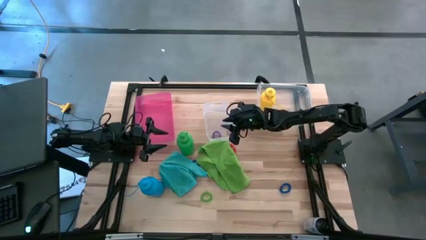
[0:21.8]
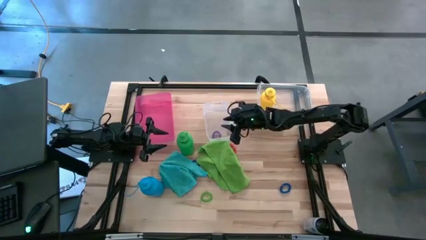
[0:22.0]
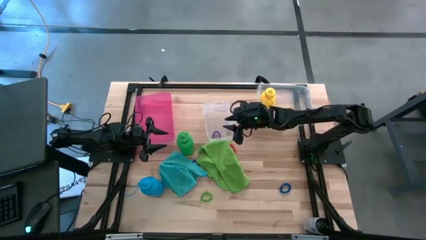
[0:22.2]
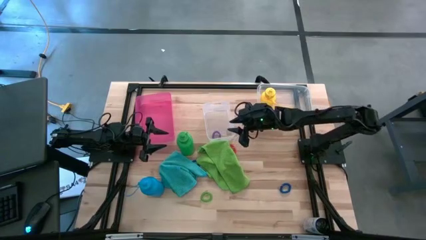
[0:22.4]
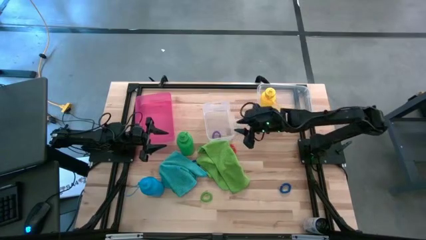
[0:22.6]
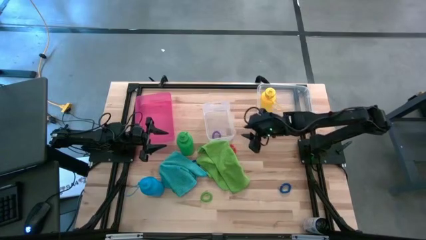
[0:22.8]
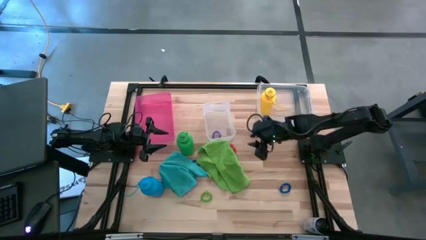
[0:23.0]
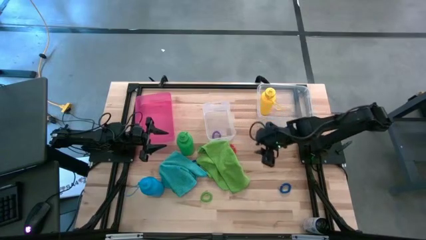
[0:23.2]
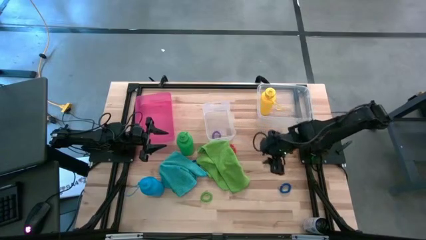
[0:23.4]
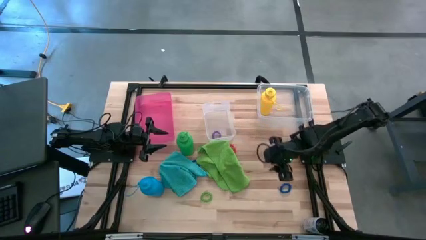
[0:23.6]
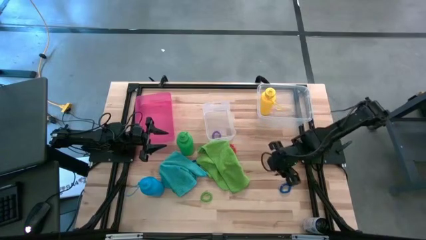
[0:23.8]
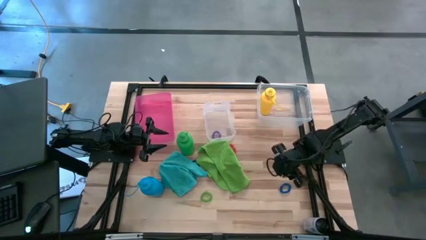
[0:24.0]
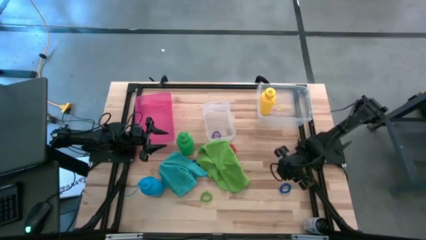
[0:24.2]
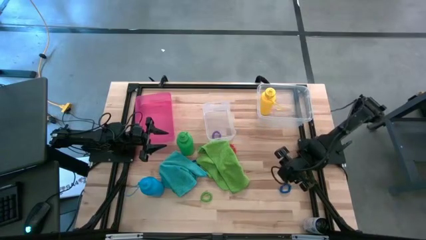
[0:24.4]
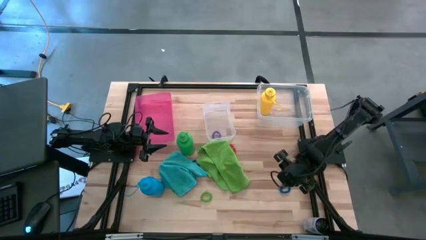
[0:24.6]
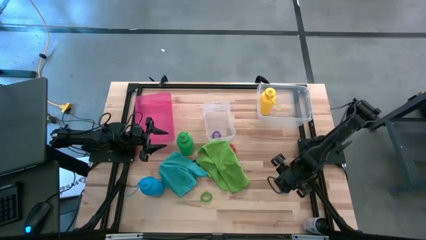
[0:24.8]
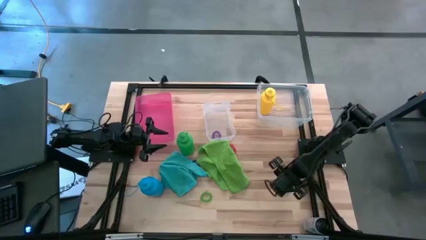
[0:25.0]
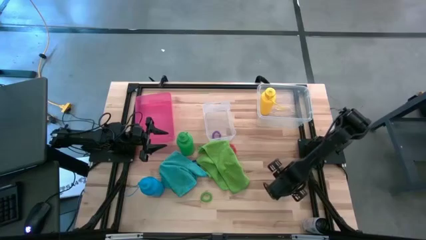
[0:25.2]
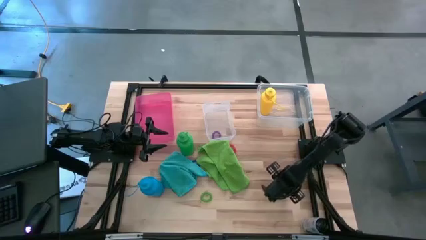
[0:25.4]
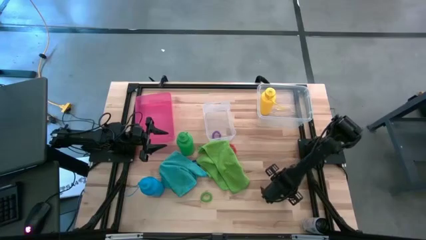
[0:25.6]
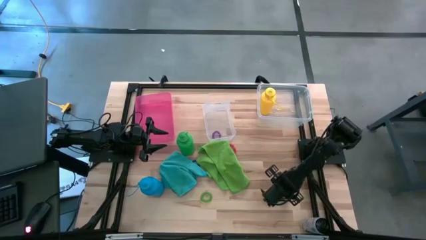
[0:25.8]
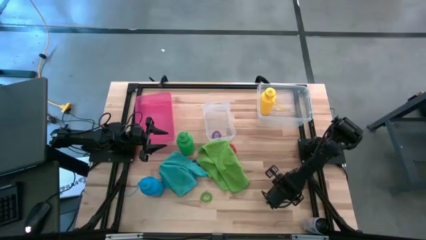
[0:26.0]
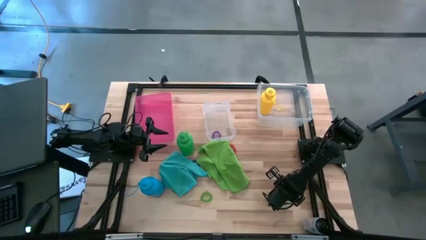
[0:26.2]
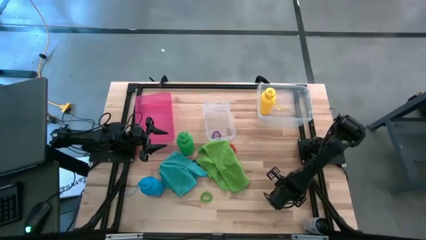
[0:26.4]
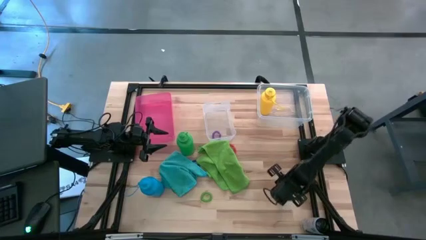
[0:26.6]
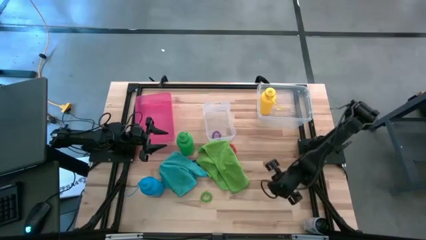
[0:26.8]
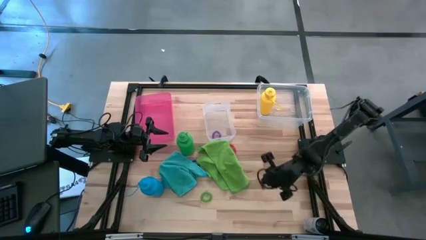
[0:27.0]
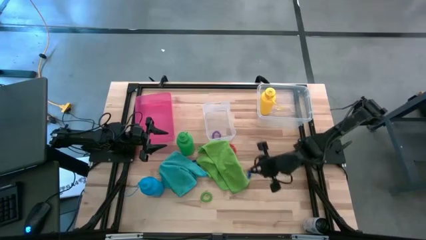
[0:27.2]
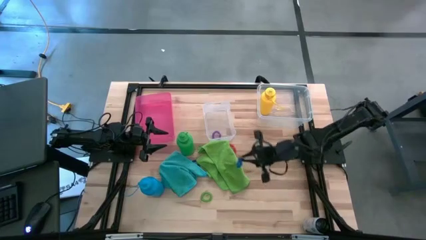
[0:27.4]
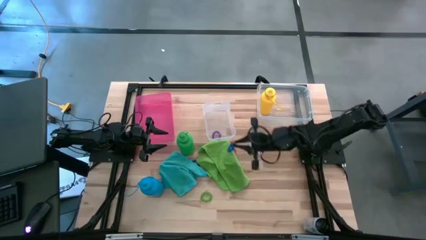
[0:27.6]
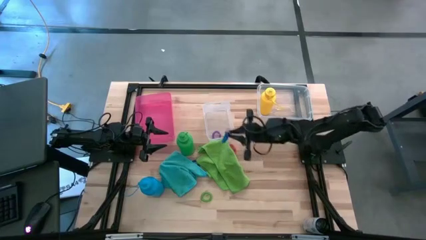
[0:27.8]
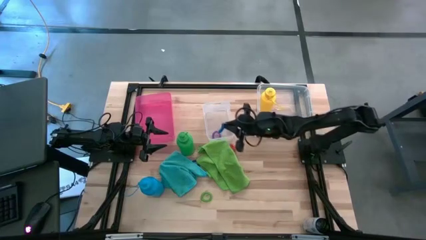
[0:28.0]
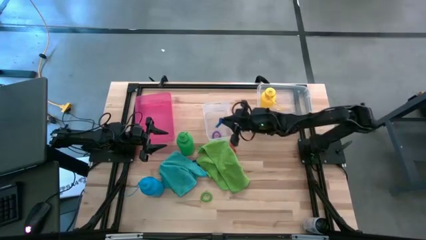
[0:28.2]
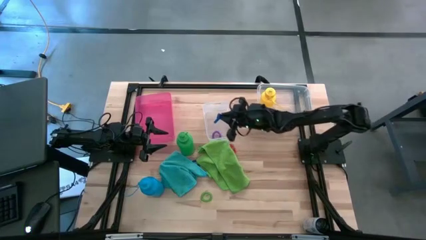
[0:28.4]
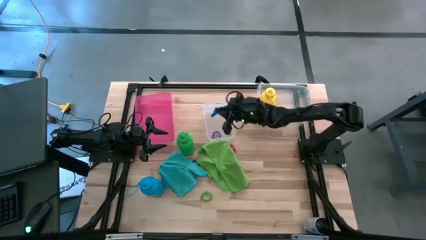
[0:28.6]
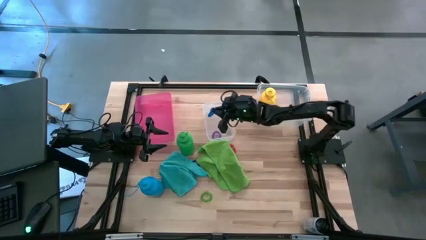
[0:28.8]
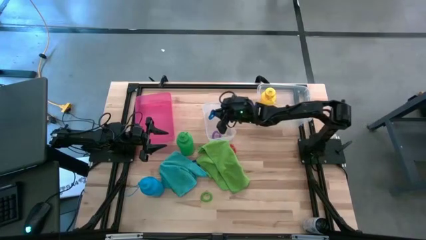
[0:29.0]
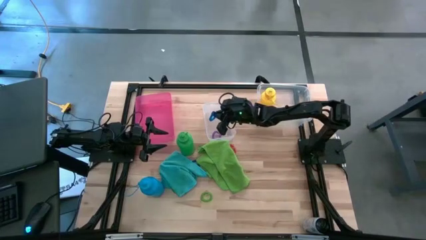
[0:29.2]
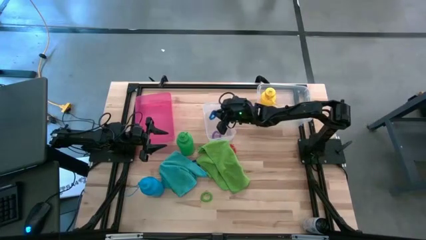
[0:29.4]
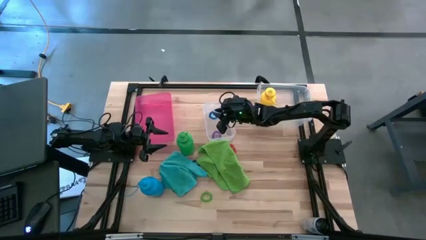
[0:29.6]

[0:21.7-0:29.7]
Task: Pick & Place Sports Items
Put the right blue spring keychain into the left transparent bin

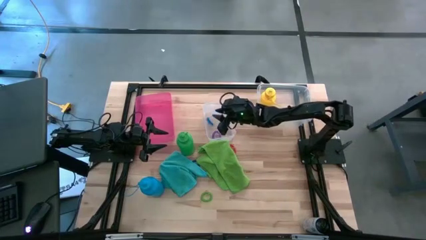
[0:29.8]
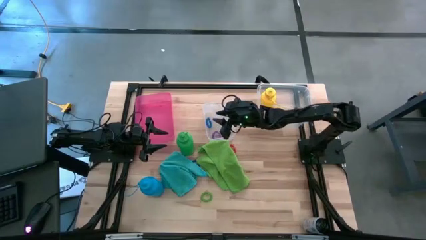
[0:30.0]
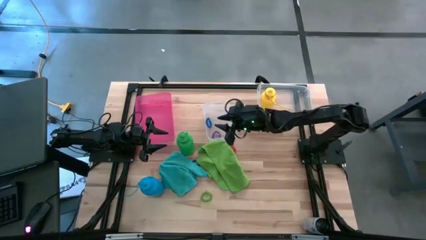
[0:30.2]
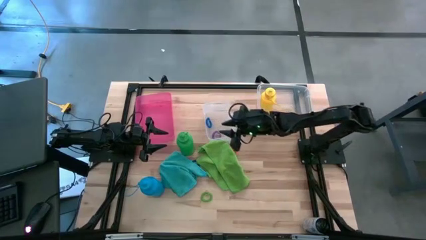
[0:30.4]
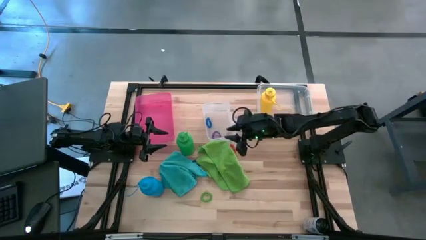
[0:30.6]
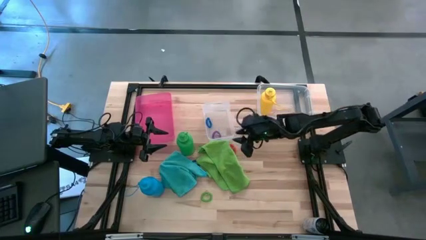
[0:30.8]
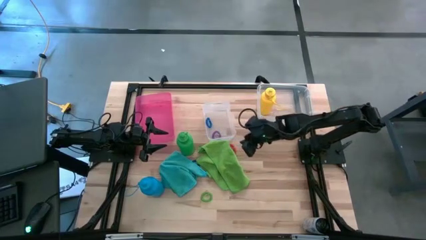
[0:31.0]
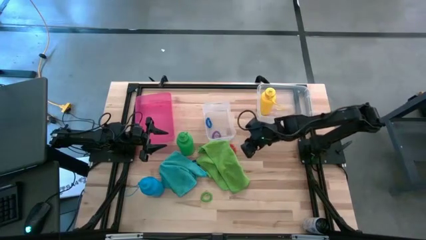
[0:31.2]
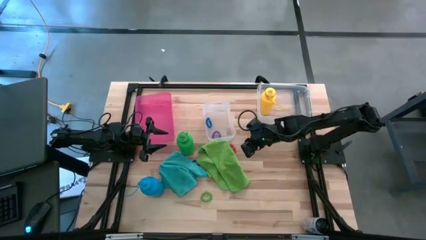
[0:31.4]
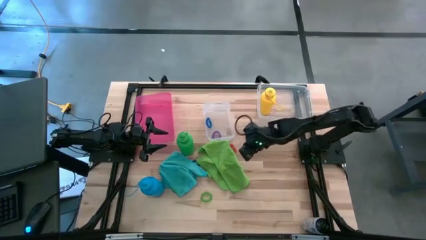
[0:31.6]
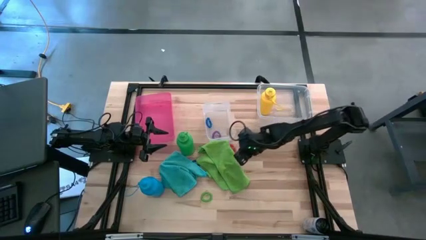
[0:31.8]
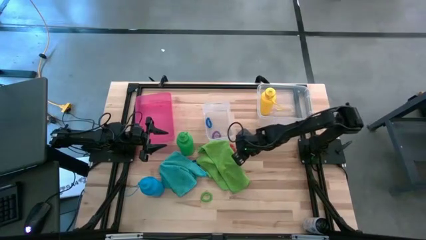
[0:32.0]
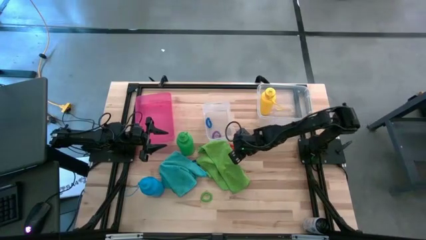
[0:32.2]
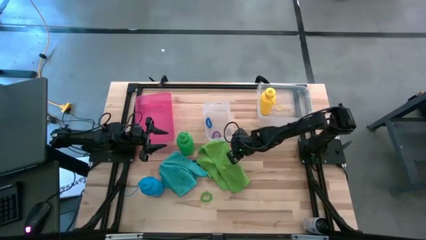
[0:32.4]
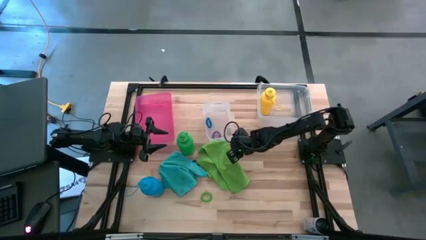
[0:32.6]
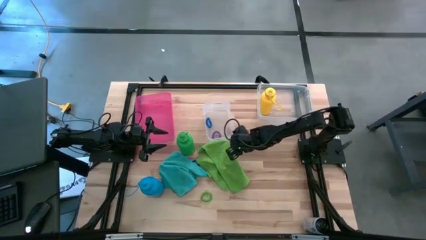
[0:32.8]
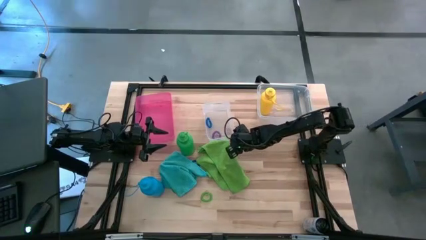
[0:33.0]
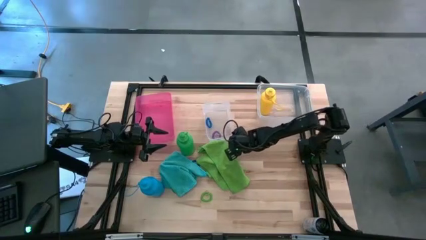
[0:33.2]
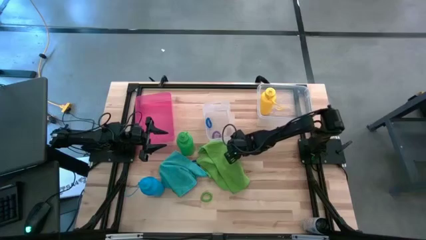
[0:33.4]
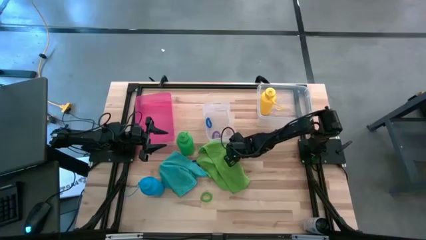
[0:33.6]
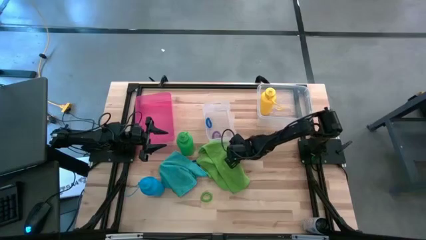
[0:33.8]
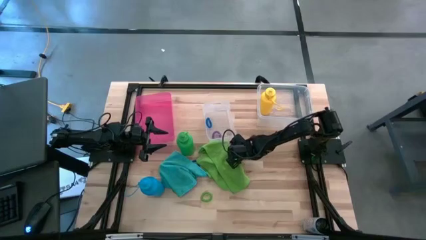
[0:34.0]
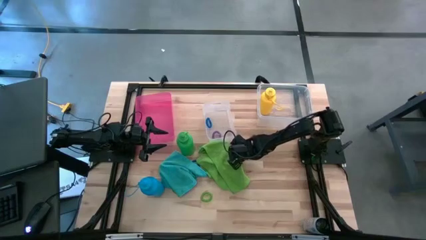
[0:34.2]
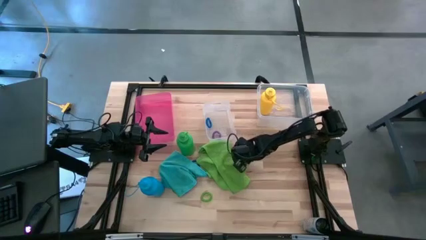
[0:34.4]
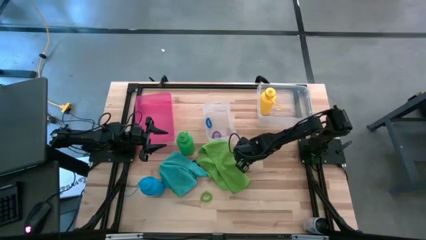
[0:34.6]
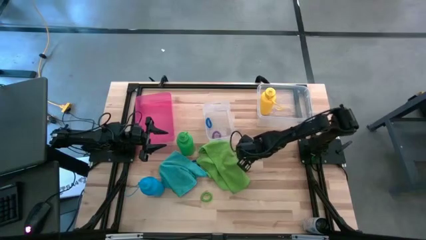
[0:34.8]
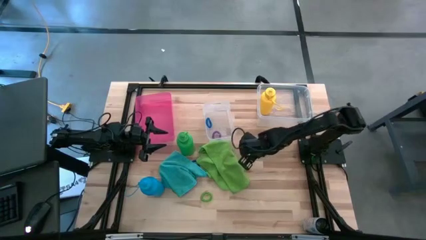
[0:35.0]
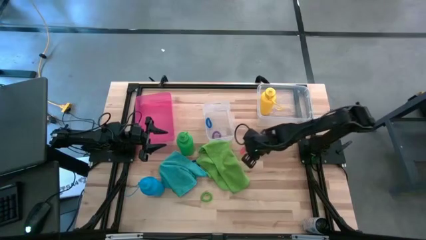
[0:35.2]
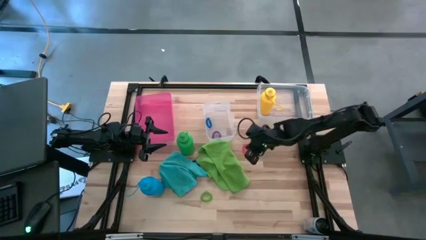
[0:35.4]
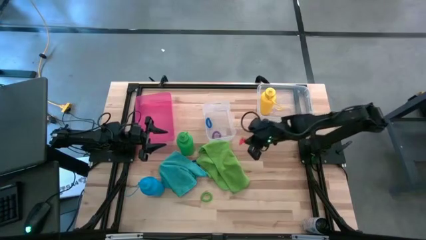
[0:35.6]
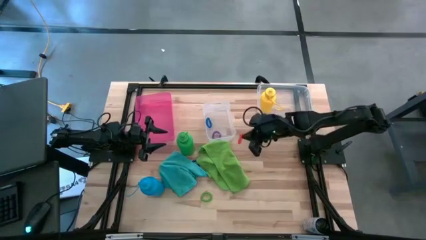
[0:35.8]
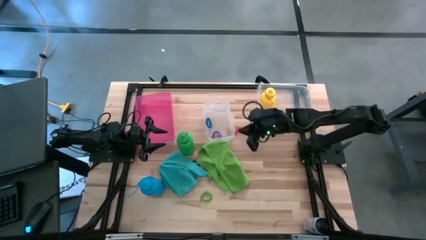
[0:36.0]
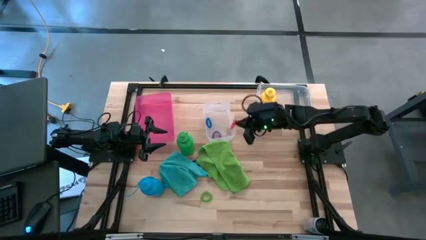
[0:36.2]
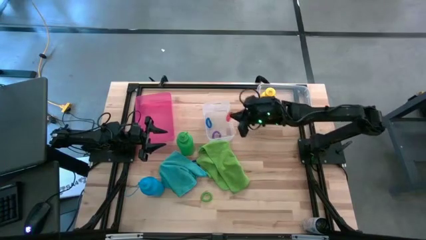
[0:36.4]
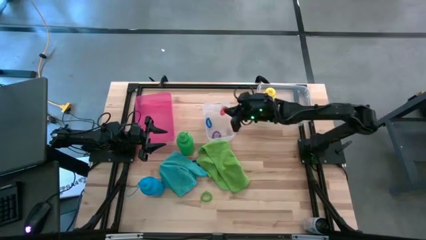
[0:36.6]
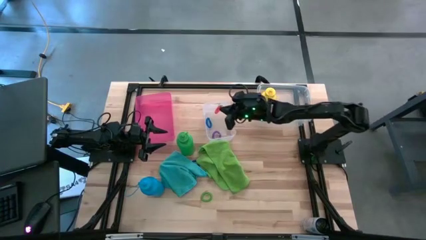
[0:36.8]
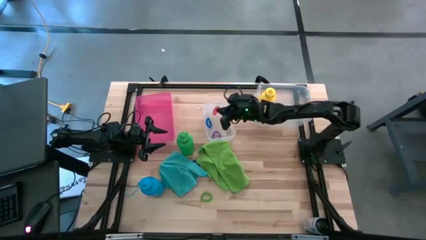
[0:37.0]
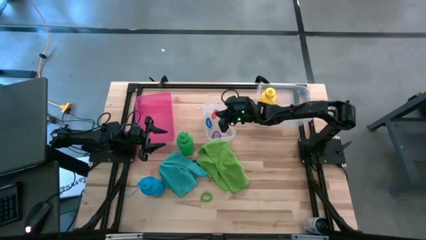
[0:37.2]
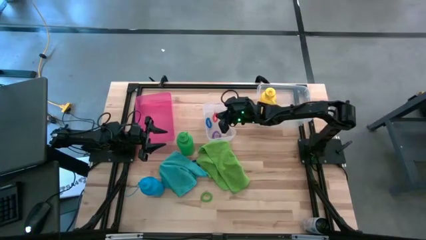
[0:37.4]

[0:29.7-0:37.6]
Put the orange spring keychain into the left transparent bin

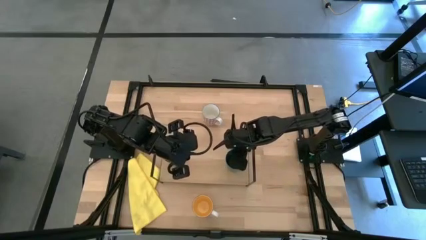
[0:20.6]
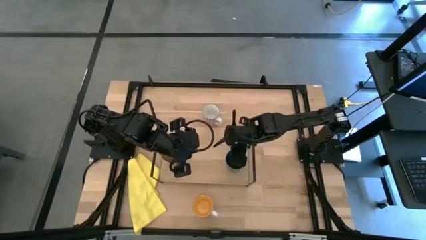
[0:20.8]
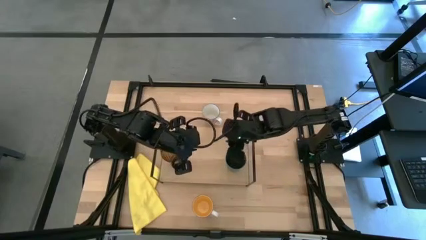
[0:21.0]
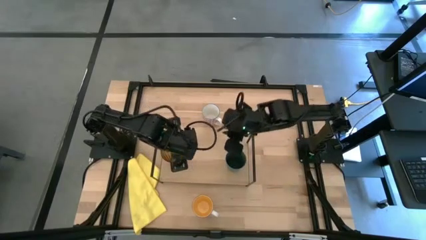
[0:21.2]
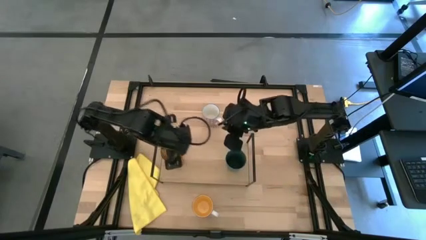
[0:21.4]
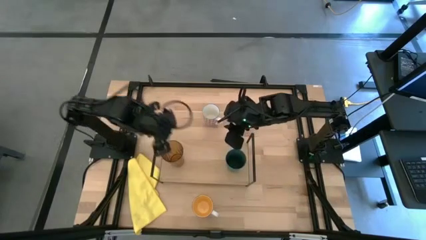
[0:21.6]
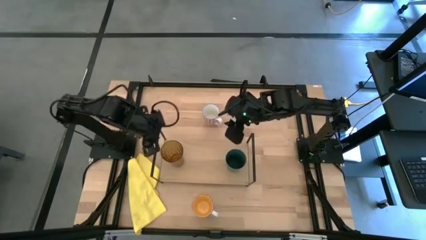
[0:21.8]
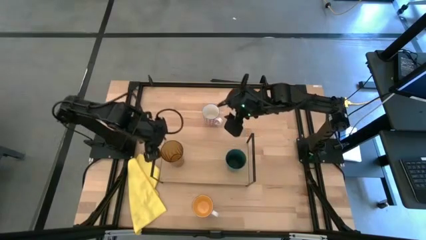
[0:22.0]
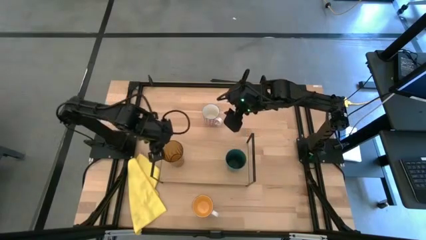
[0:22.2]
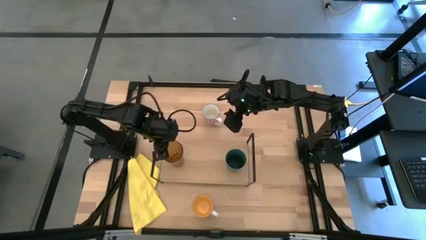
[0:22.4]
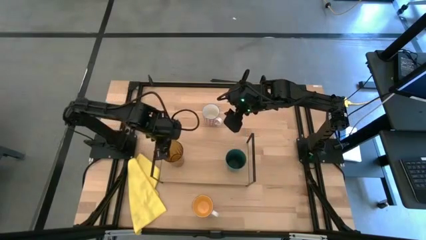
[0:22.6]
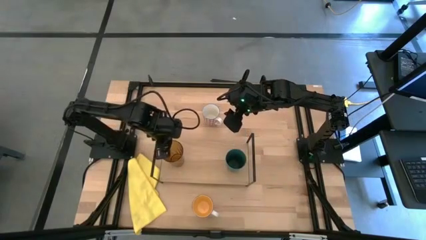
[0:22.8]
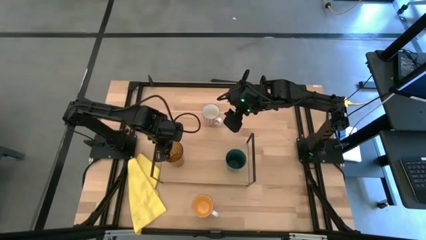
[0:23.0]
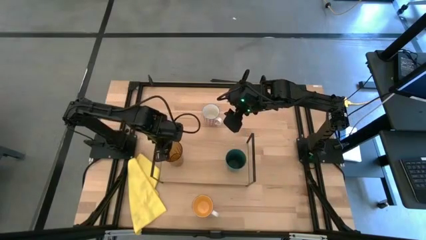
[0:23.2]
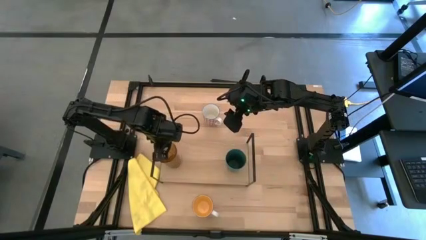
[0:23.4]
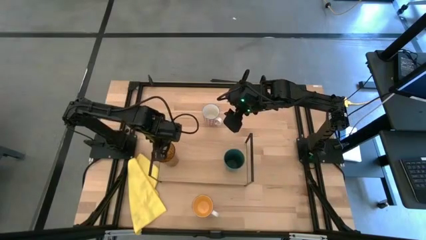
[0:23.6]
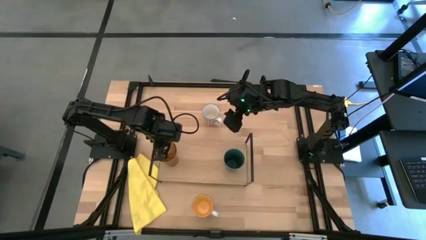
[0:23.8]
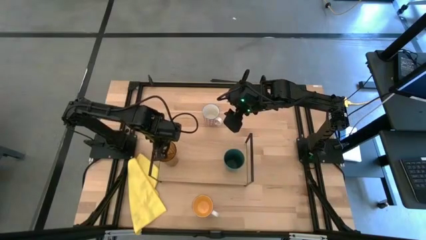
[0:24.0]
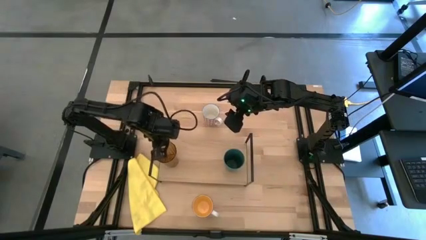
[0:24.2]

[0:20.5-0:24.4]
Task: Stack small to large cups/mugs on shelf
Adjust the brown cup on the shelf
